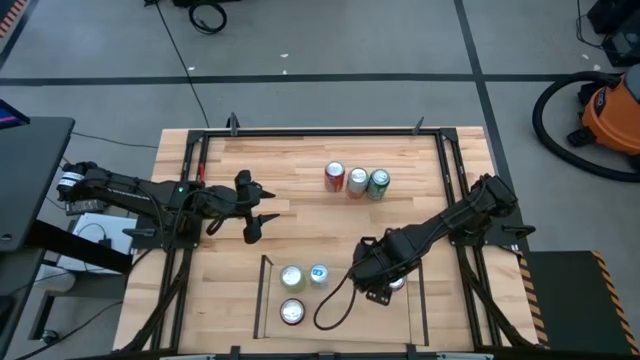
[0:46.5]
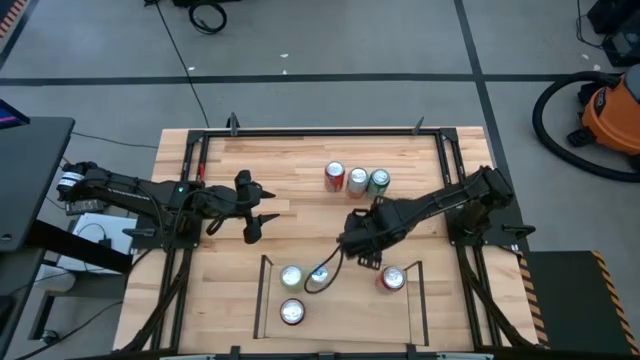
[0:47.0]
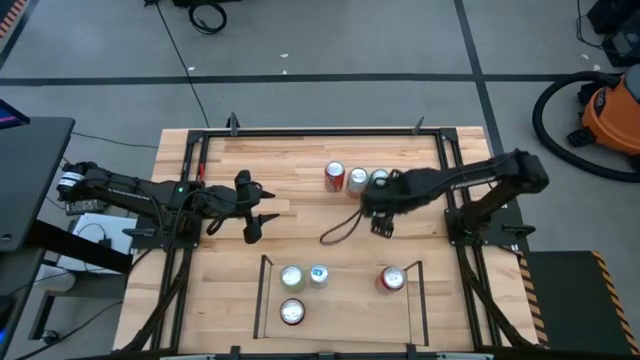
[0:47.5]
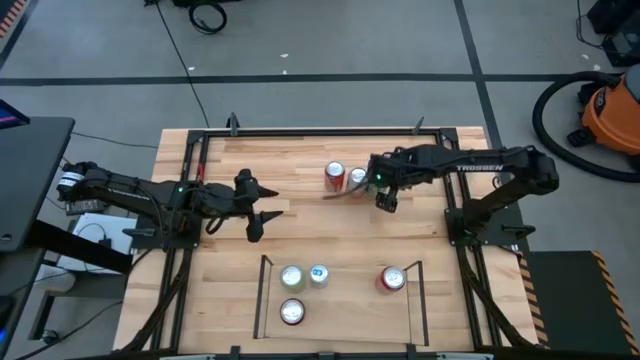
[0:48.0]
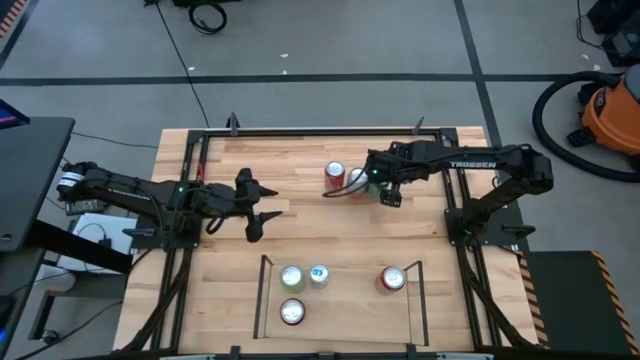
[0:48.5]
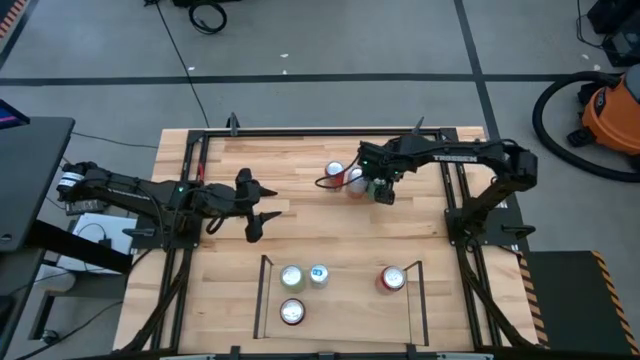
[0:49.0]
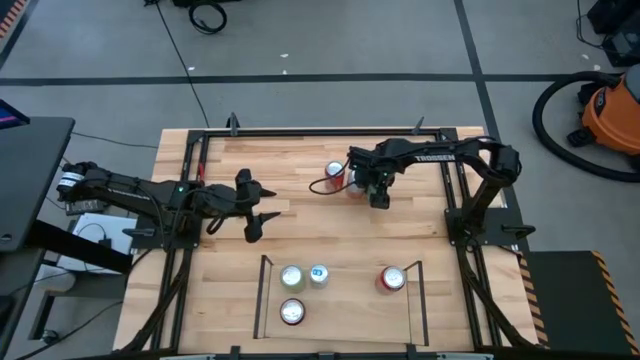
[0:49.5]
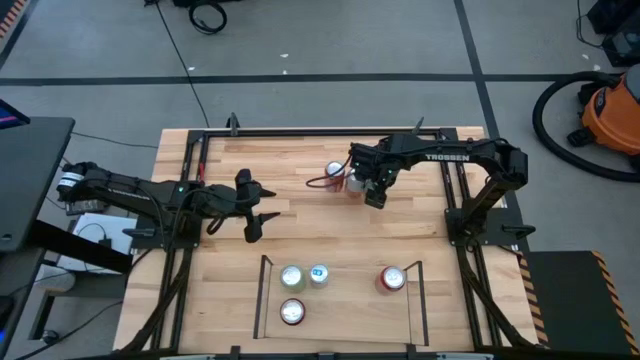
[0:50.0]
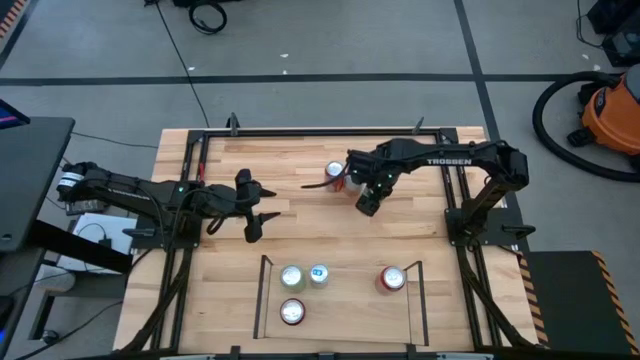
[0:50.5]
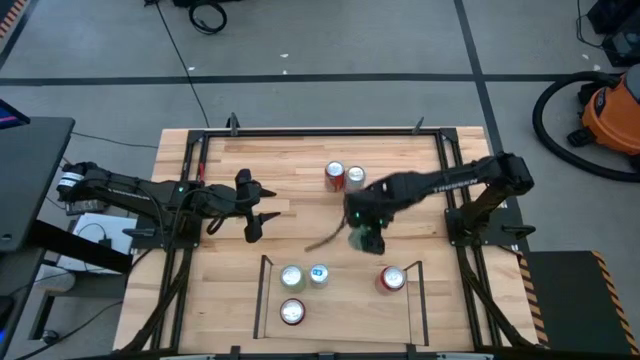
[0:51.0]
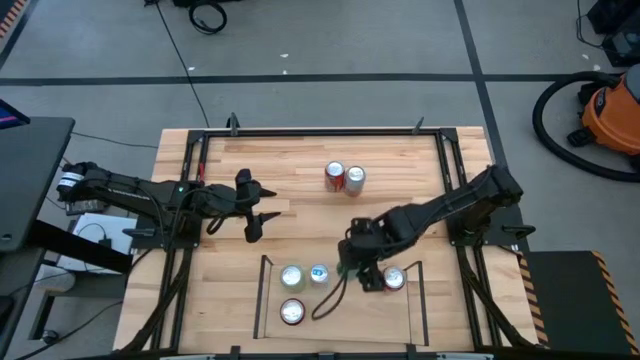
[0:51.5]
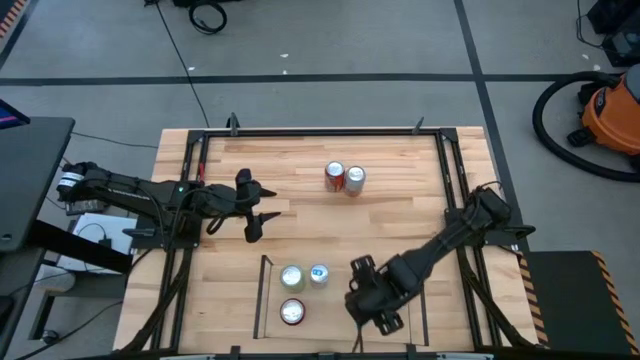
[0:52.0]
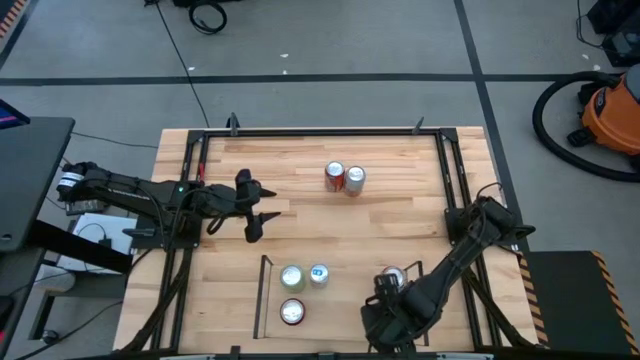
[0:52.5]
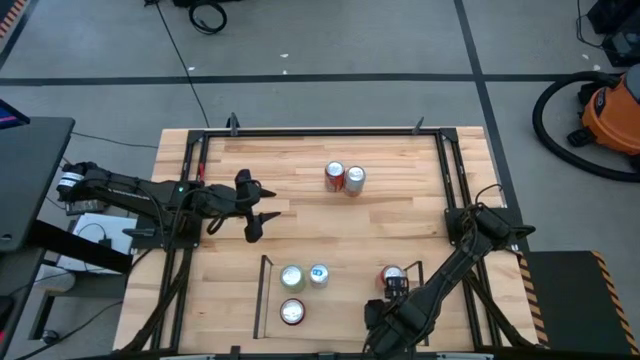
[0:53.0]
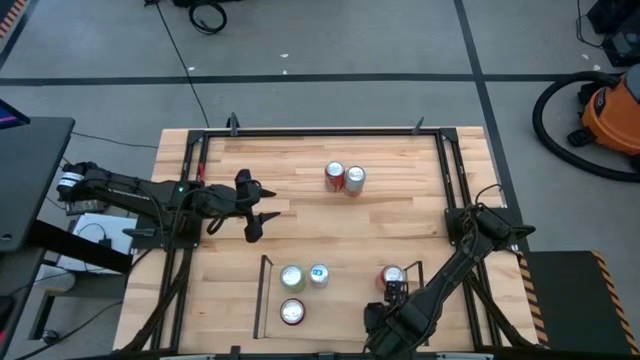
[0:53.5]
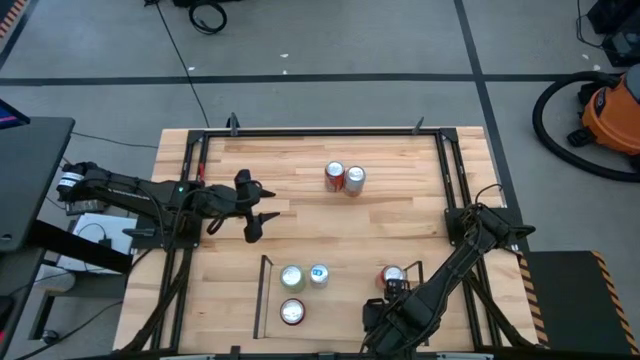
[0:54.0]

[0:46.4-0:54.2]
Task: Place canned beverage on shelf
Put the green soda can on the shelf

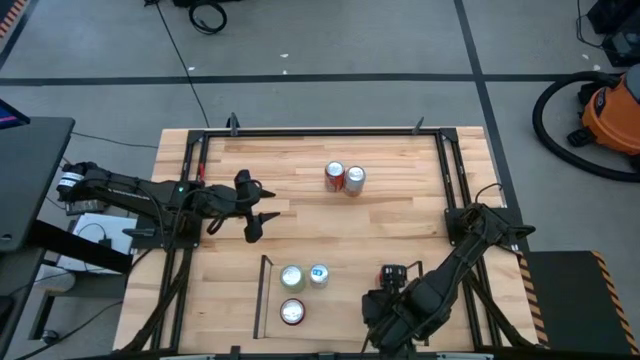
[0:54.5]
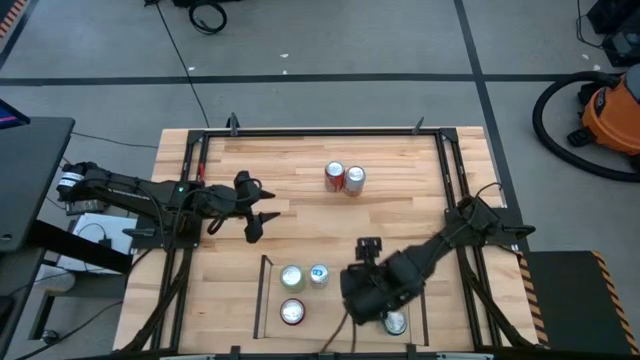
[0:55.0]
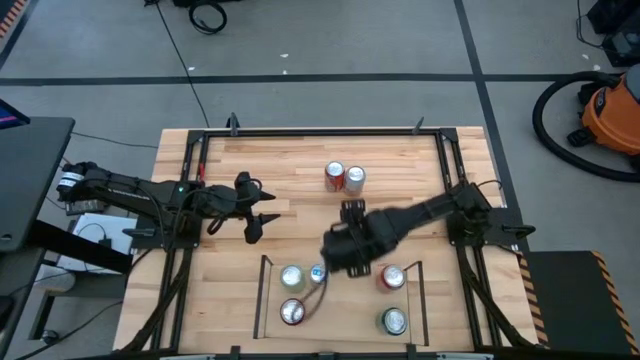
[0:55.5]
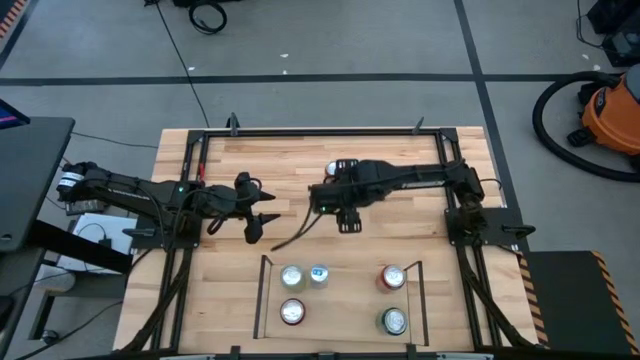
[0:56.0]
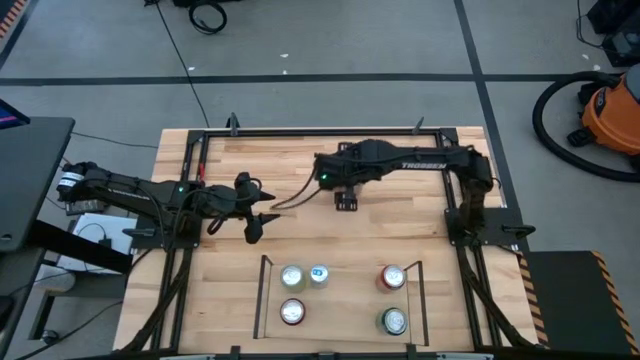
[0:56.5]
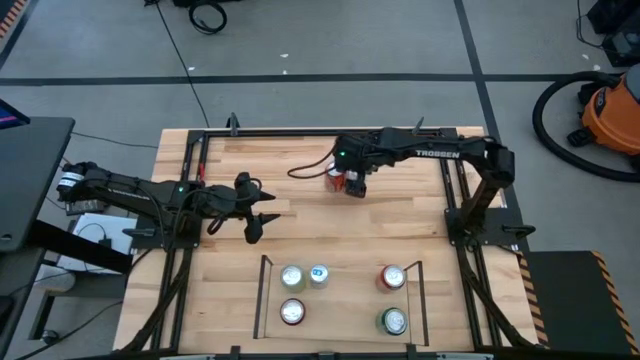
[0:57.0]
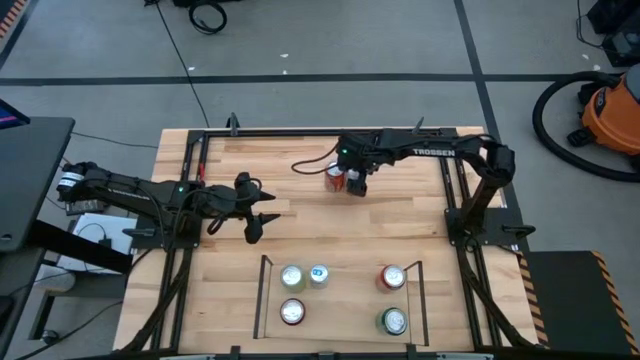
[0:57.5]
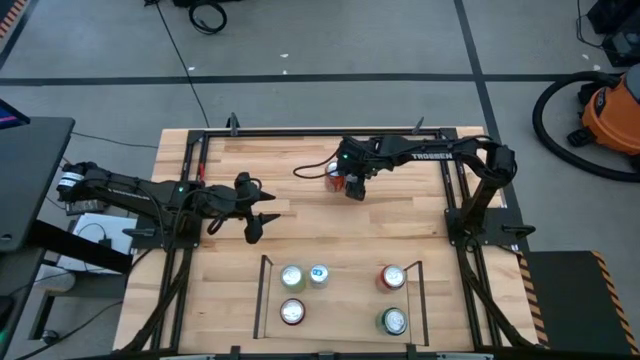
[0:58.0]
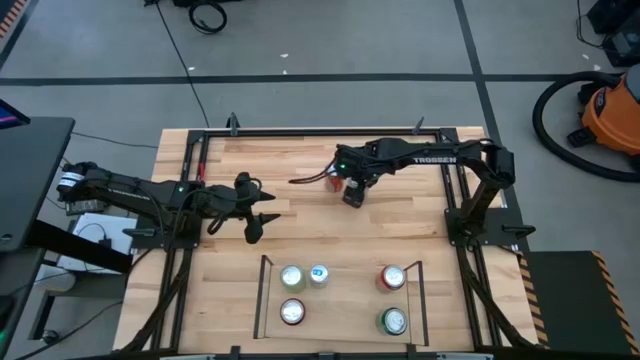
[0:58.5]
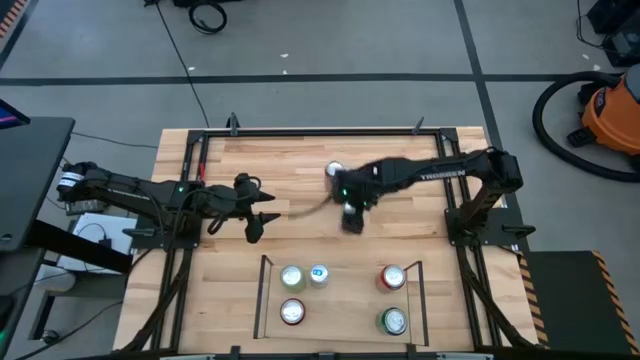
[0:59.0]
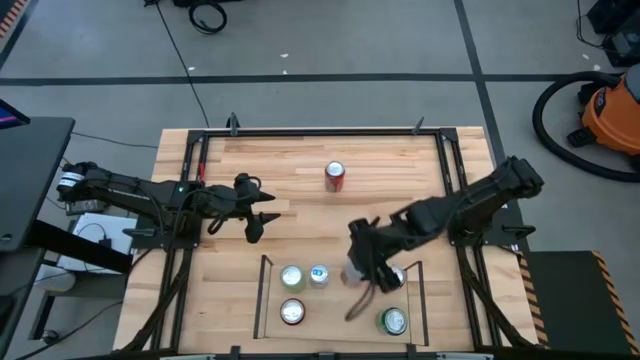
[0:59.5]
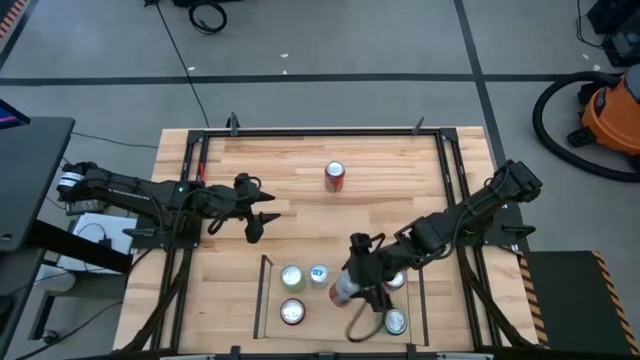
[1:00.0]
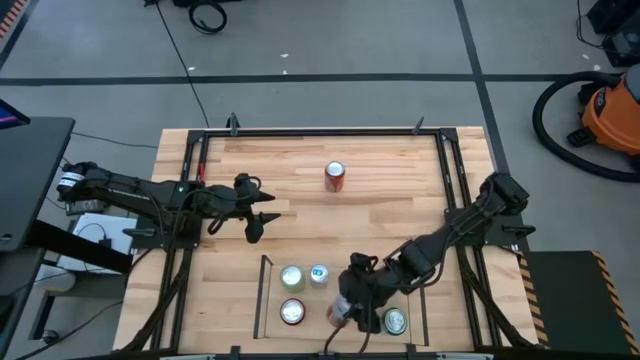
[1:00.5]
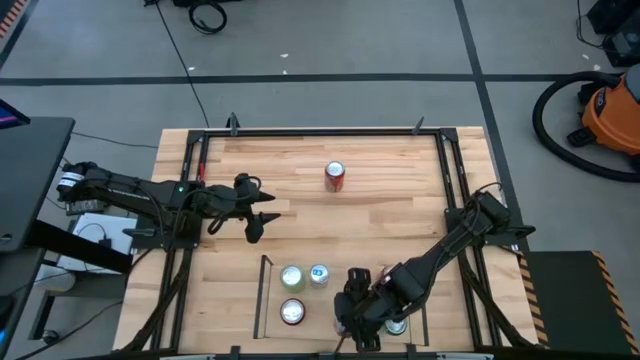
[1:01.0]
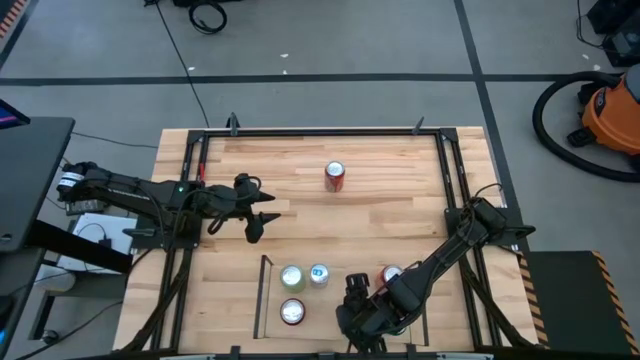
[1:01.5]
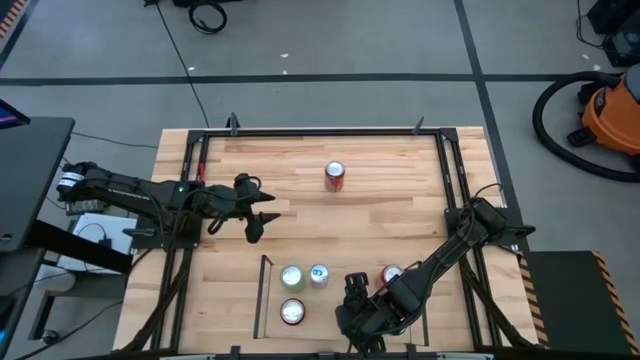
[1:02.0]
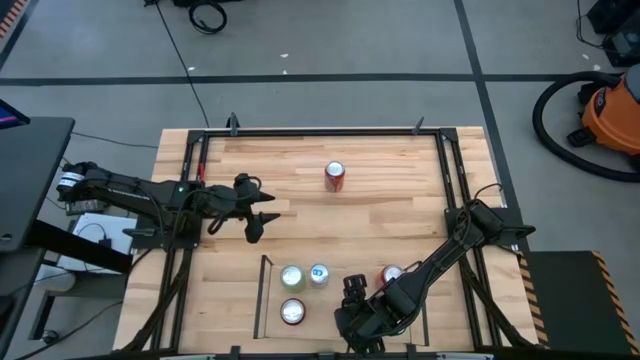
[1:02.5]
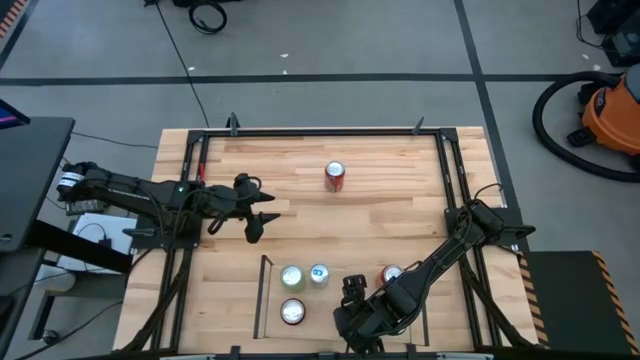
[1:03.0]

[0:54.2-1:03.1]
Put the orange white soda can on the shelf

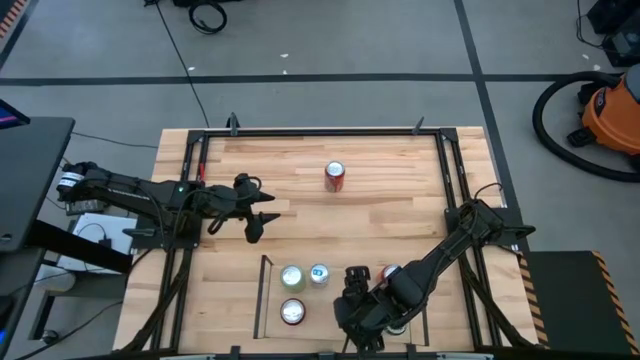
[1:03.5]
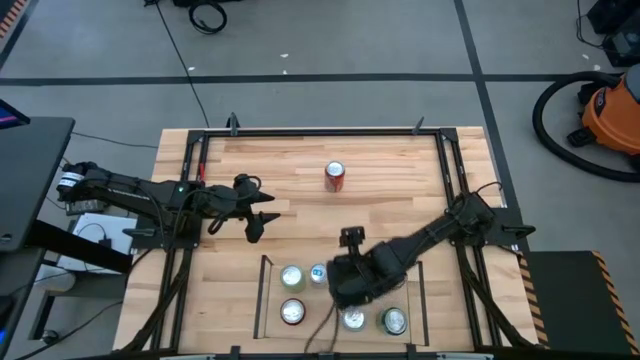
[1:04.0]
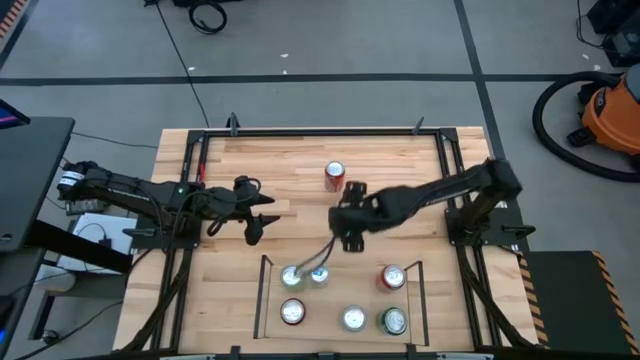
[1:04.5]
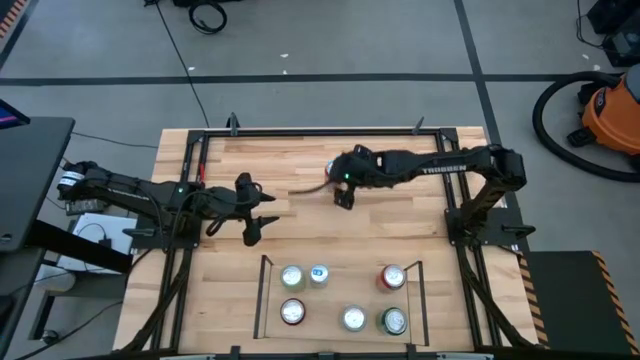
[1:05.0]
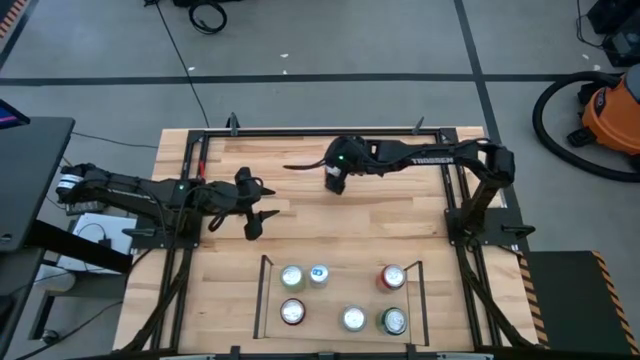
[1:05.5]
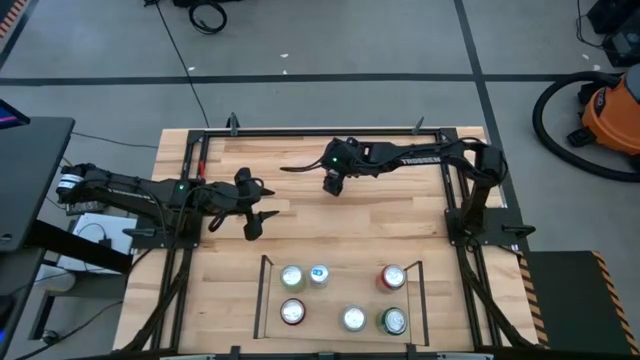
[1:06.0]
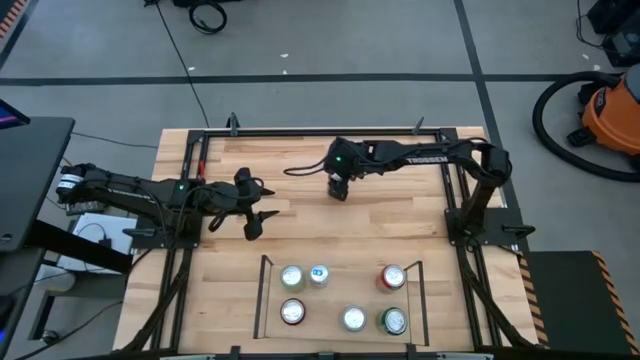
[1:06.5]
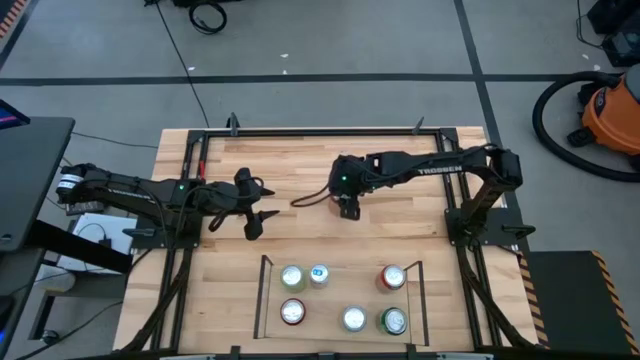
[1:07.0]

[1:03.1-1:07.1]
Put the orange soda can on the shelf
